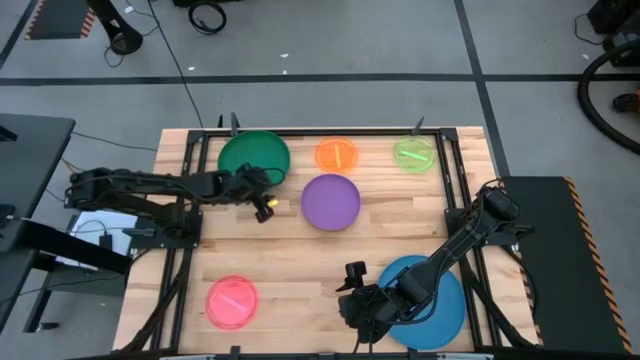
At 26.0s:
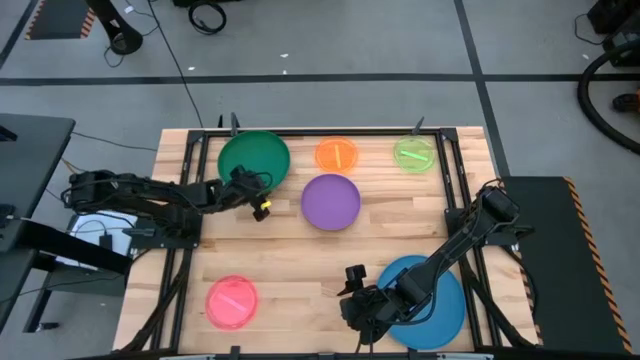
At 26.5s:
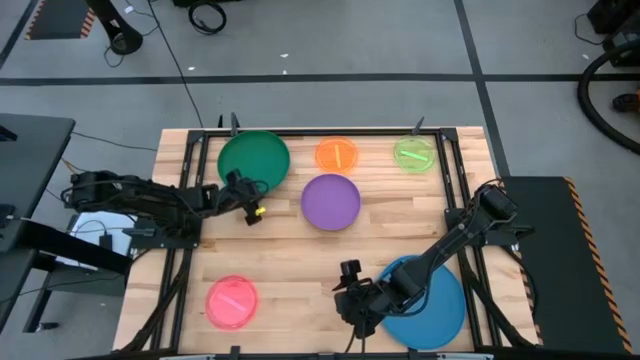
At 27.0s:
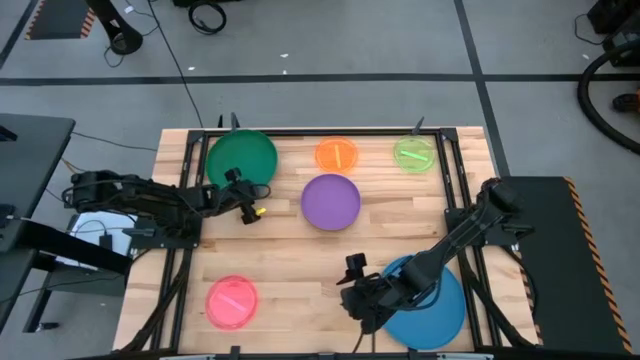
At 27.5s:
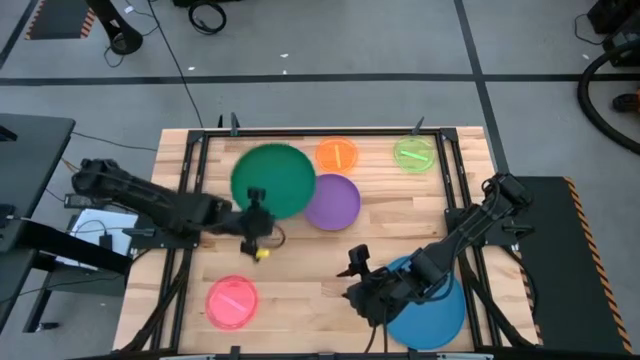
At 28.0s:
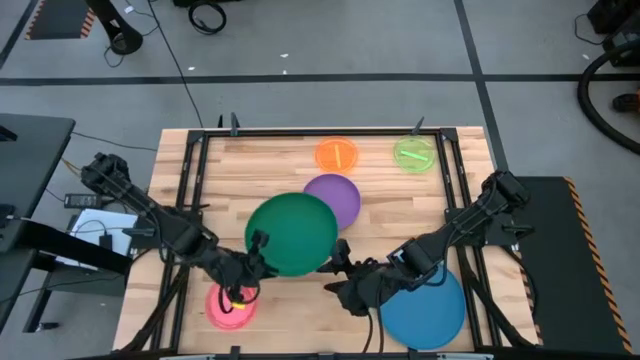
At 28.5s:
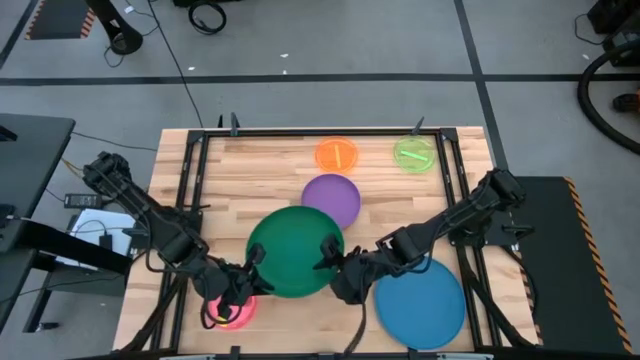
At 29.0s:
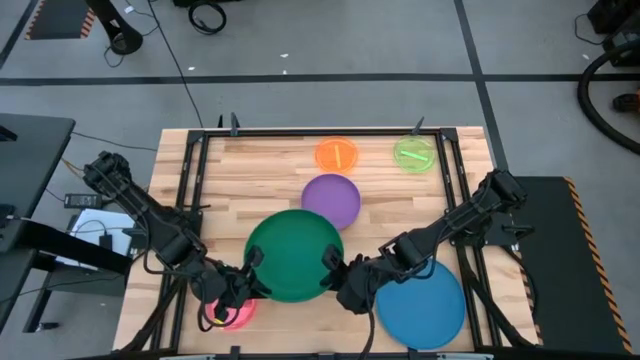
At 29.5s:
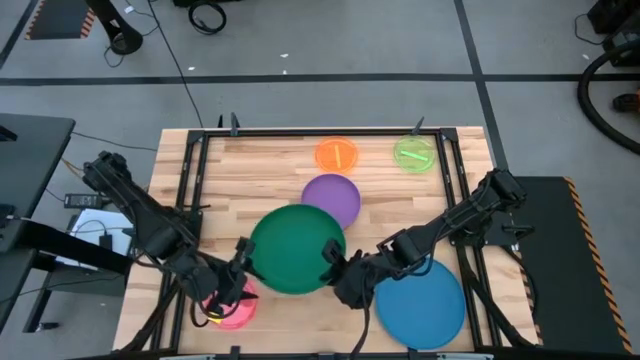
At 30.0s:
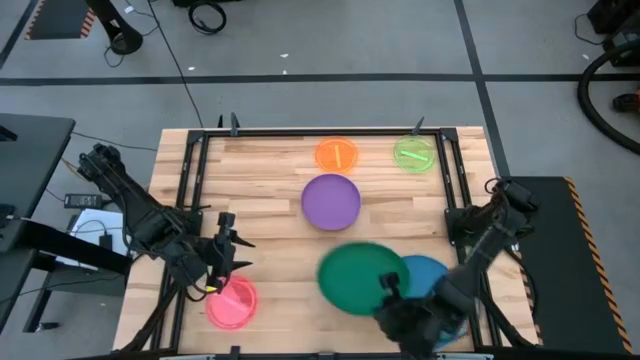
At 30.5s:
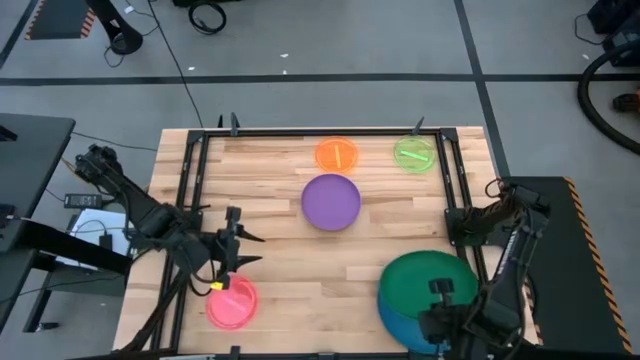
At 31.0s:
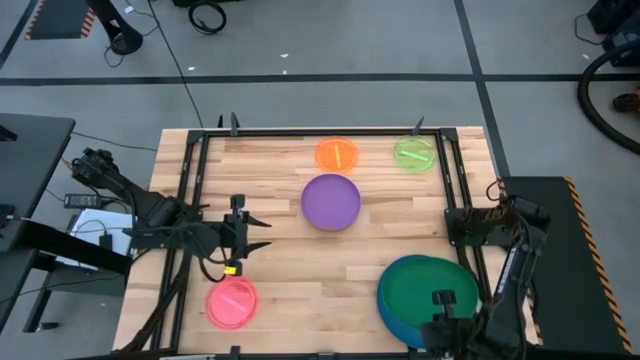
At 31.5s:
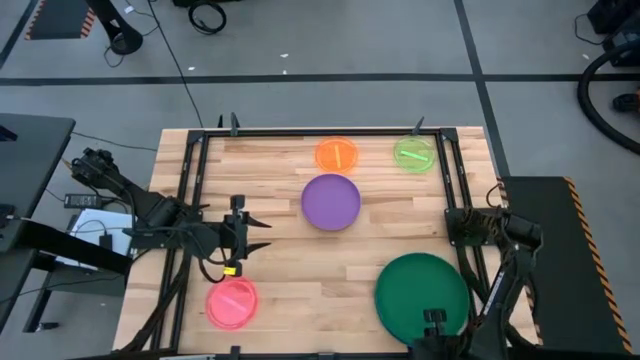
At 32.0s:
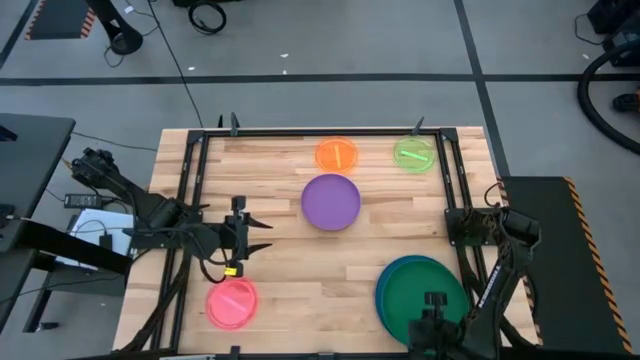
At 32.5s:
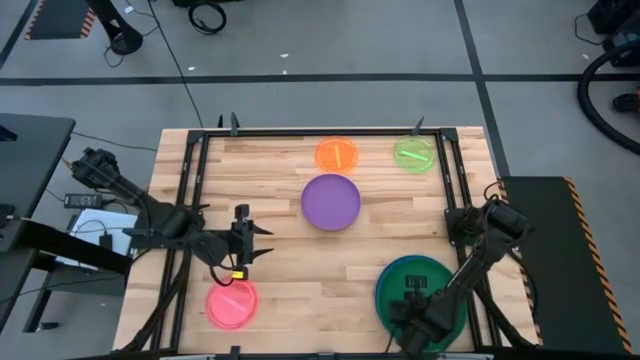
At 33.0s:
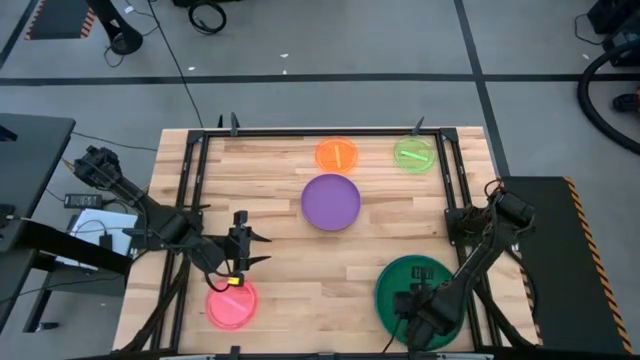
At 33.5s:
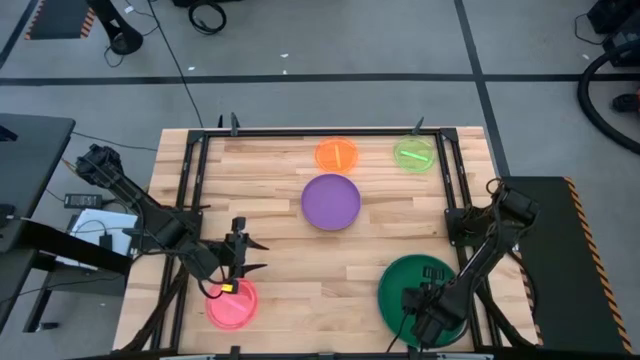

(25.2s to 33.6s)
Task: Stack plastic plates
Stack the plates on top of the blue plate

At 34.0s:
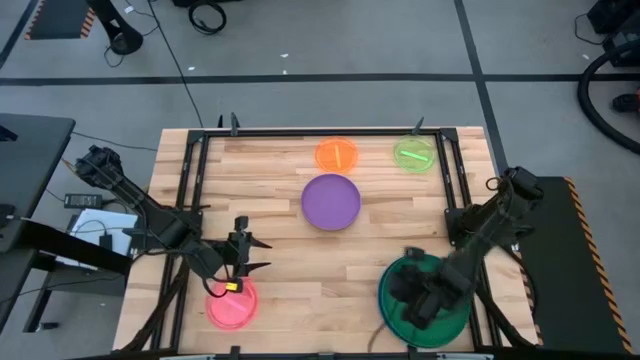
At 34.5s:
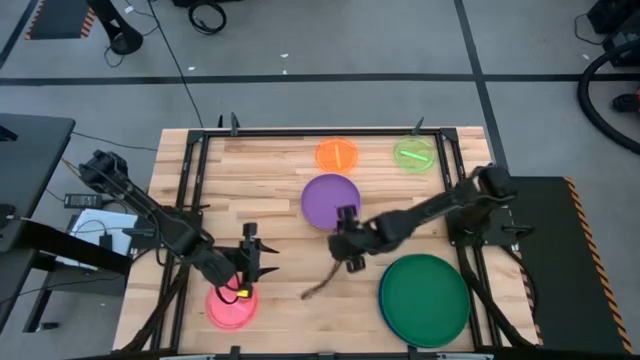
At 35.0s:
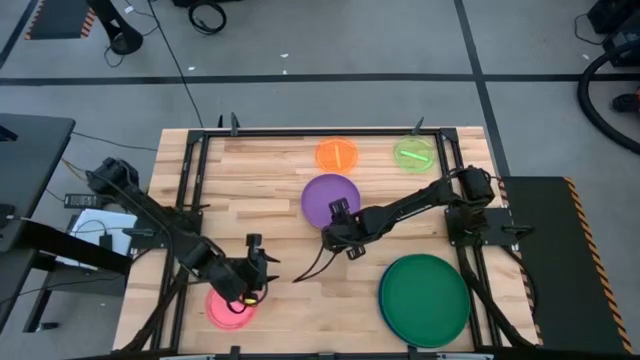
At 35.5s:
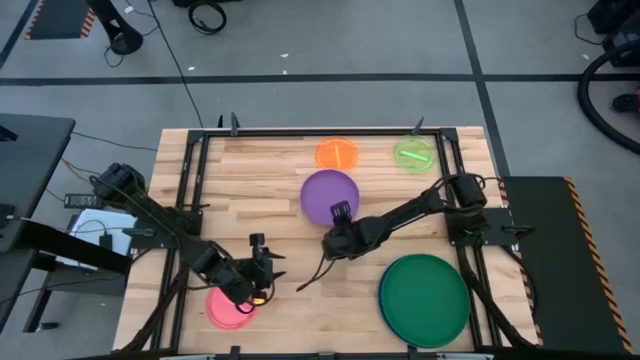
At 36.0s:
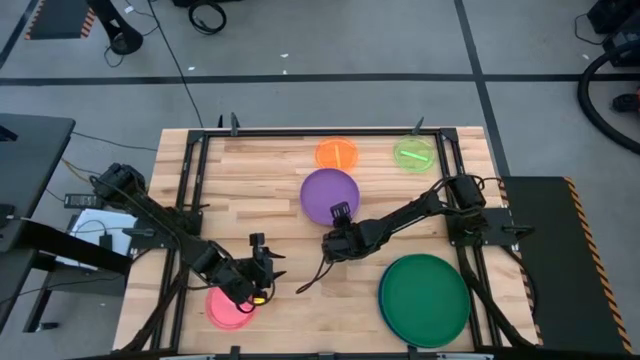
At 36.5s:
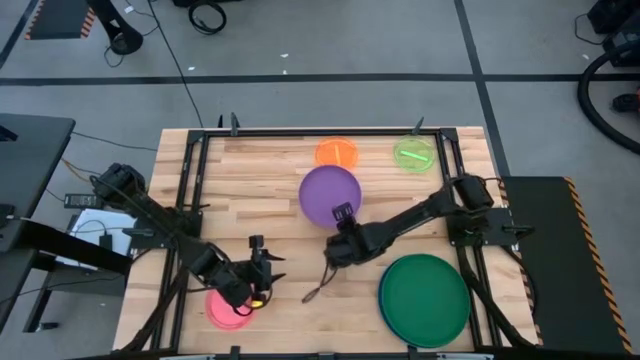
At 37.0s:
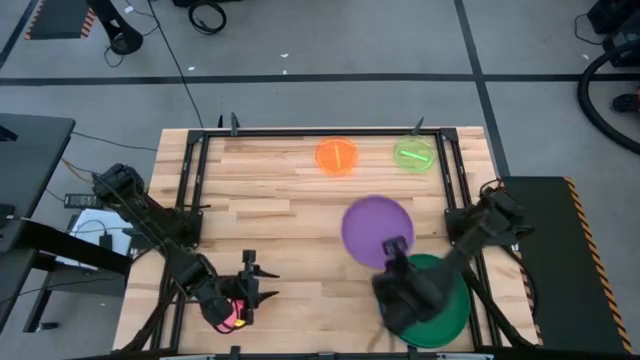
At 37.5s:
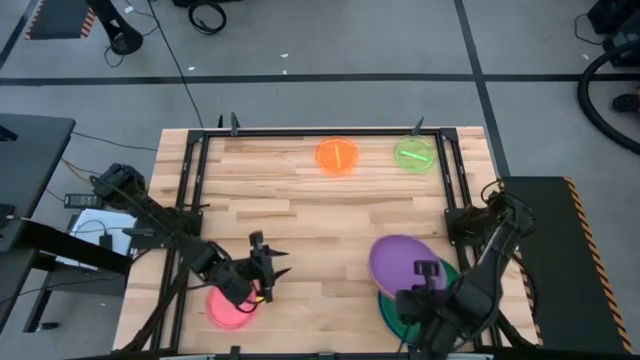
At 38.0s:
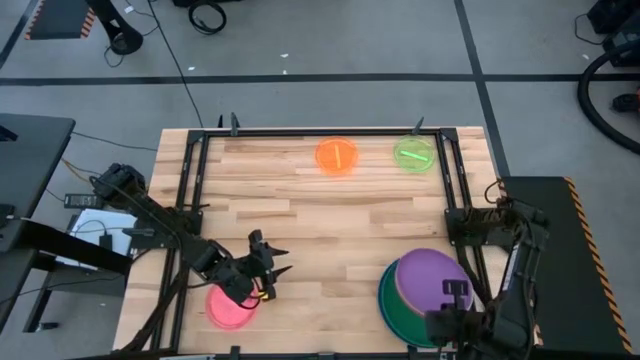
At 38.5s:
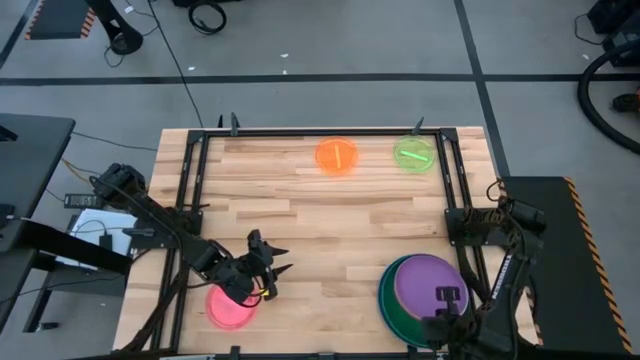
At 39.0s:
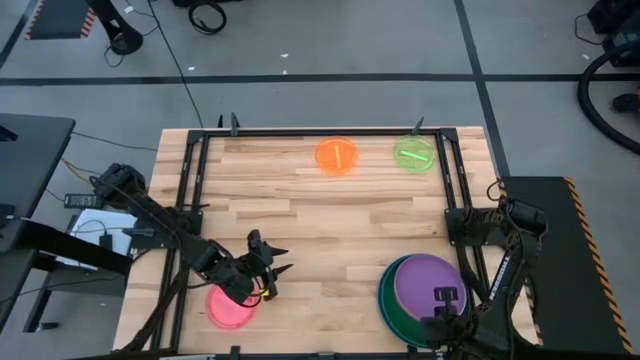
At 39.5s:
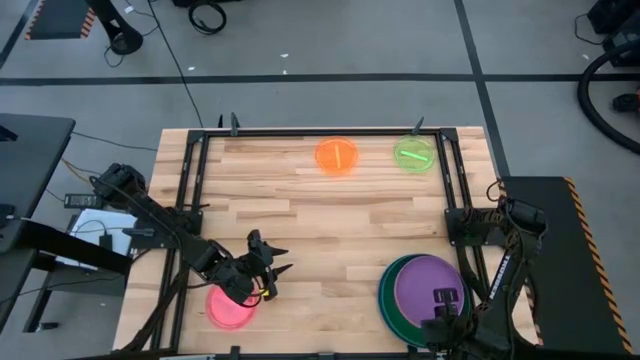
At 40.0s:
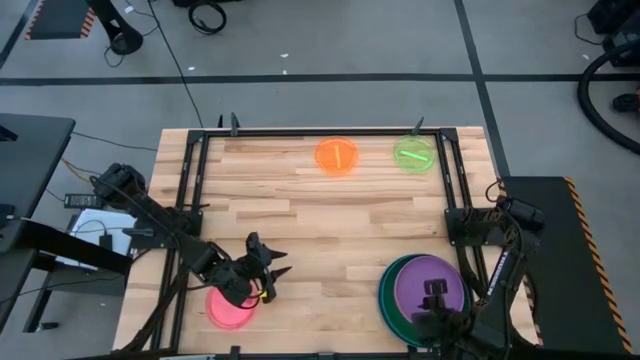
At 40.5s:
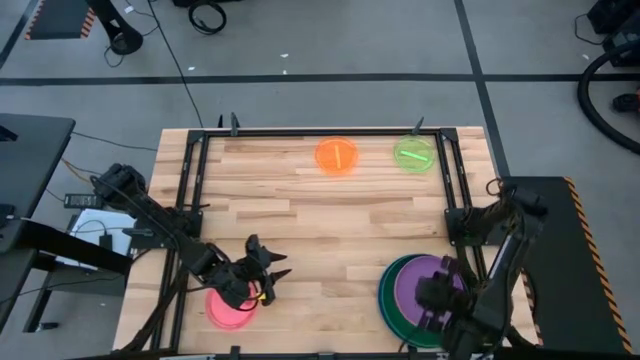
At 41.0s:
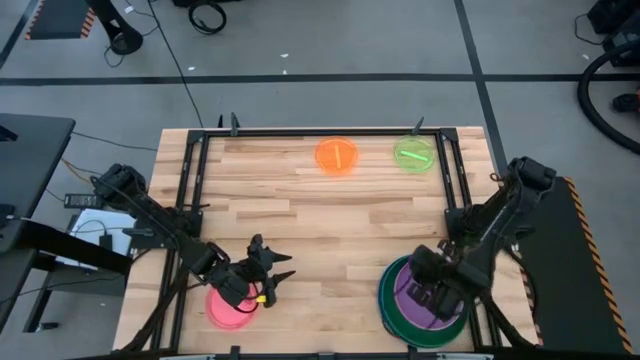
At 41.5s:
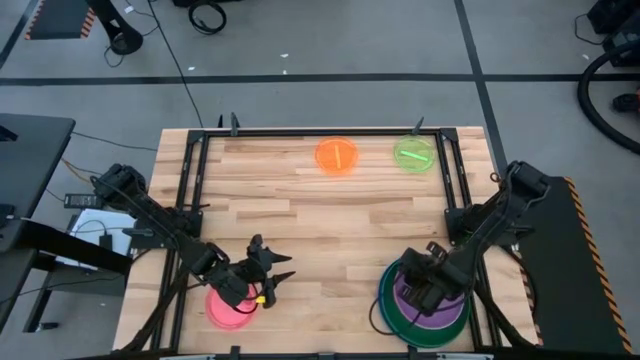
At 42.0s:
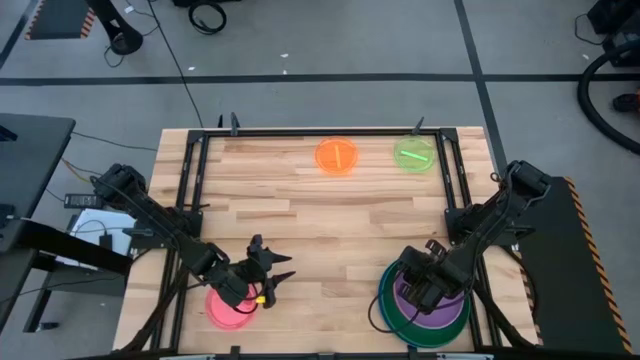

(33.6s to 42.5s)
Stack the top plates on top of the green plate

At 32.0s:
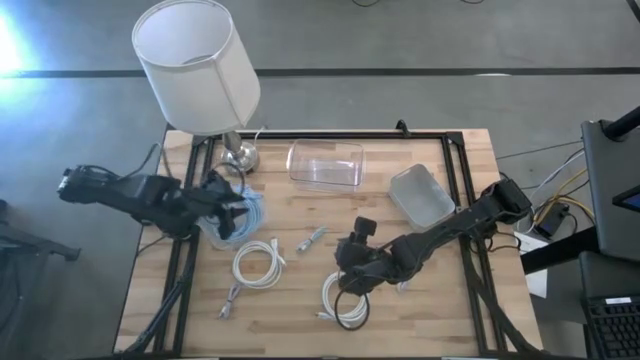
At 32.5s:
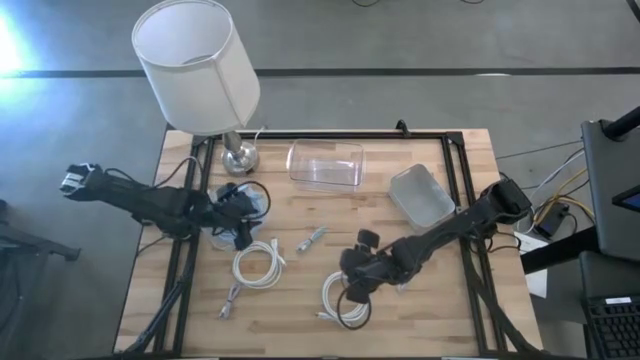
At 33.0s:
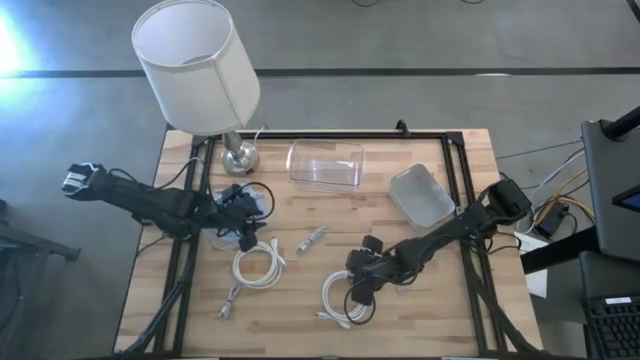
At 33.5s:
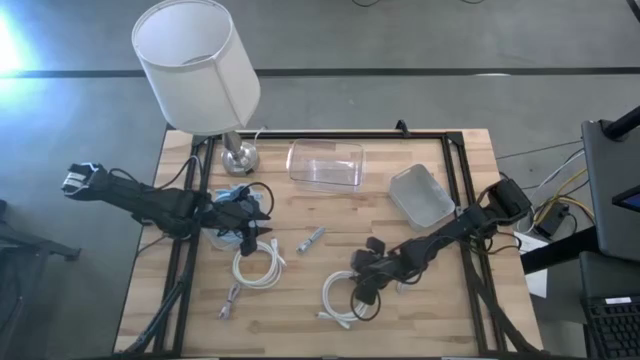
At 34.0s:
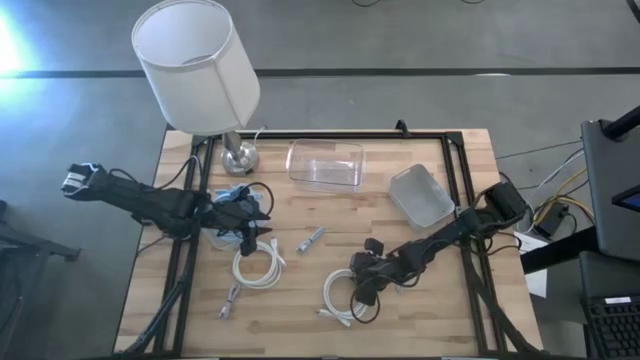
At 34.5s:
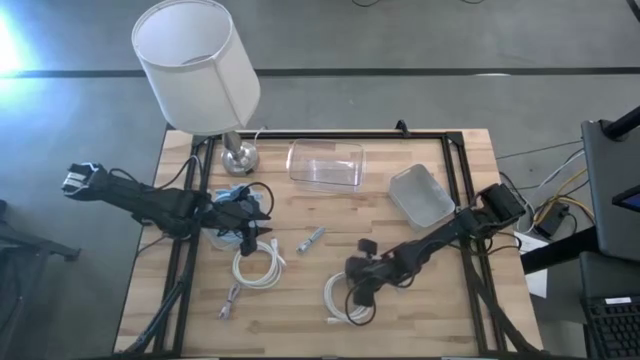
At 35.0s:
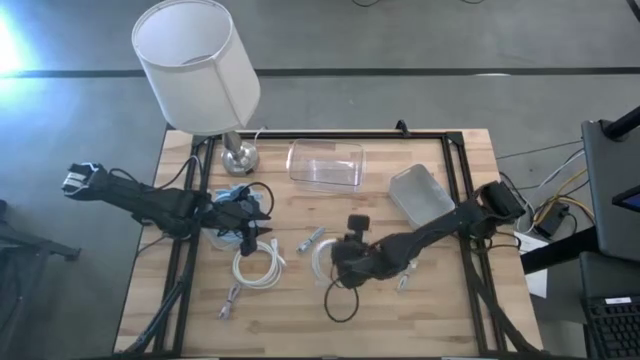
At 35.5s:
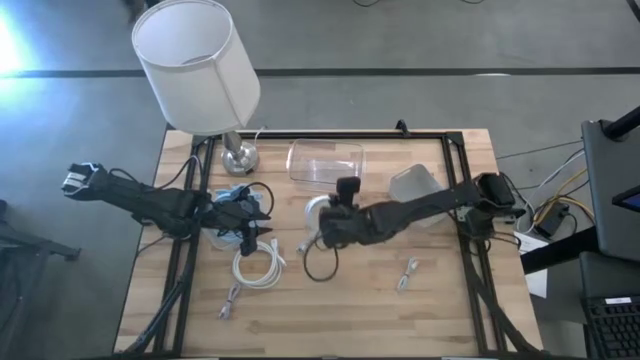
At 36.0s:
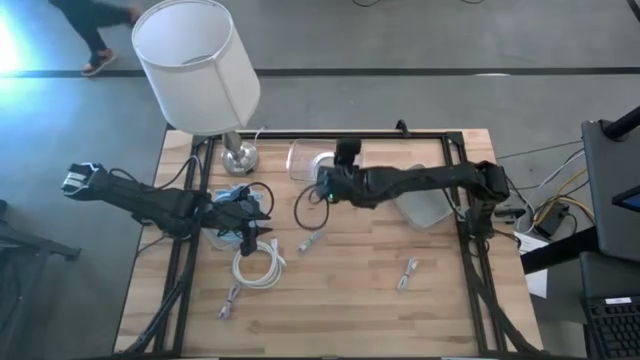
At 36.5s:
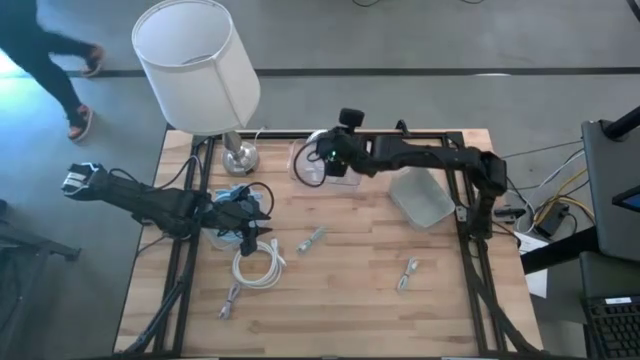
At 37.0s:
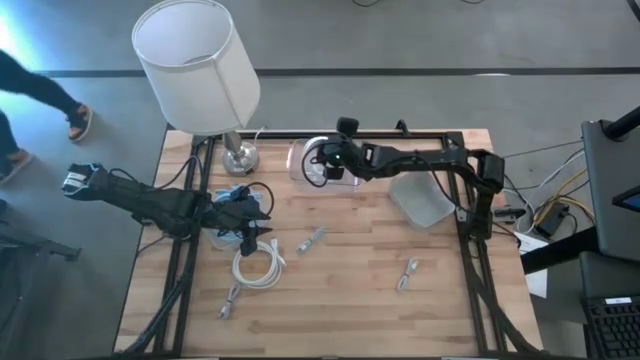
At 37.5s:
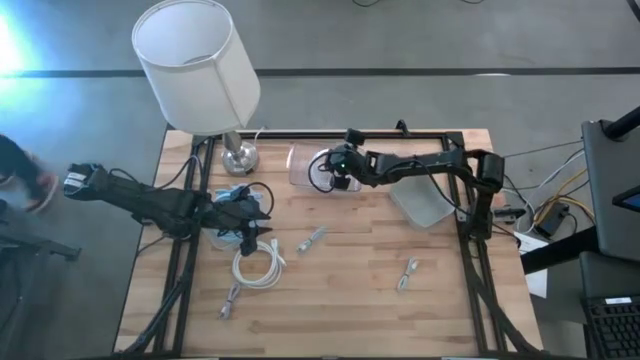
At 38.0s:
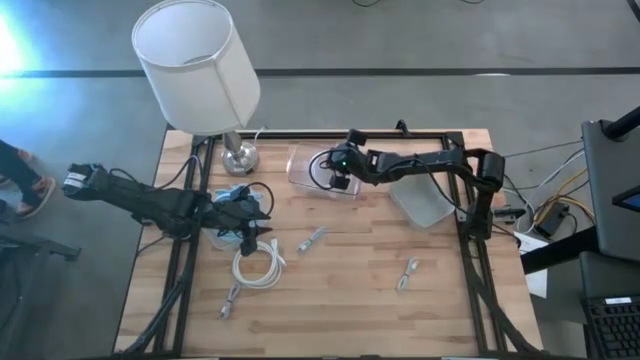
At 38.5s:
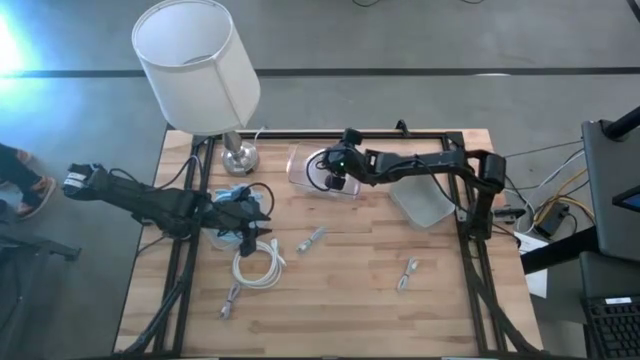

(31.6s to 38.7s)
Task: Pick & Place USB Port
Put the right white HDMI cable into the transparent bin
